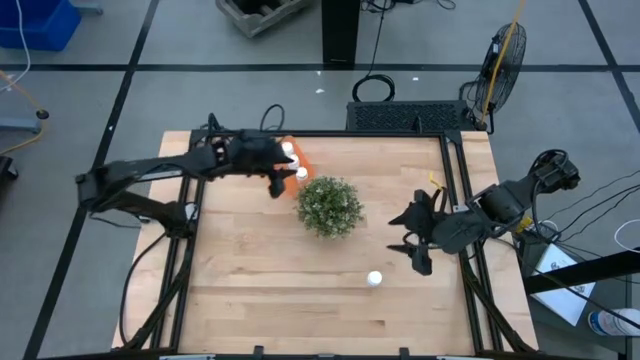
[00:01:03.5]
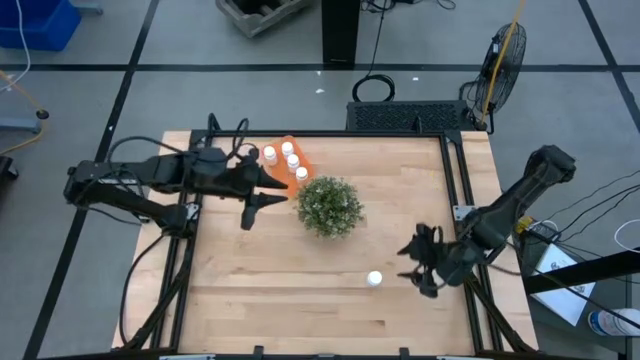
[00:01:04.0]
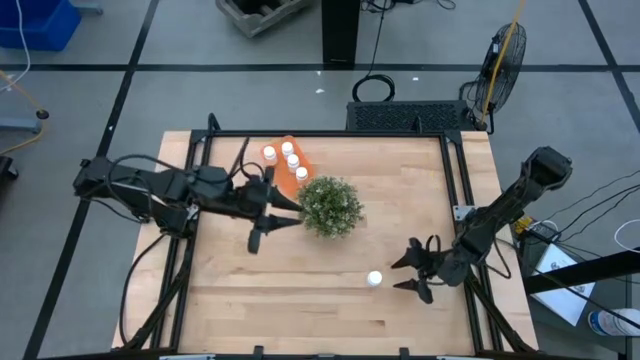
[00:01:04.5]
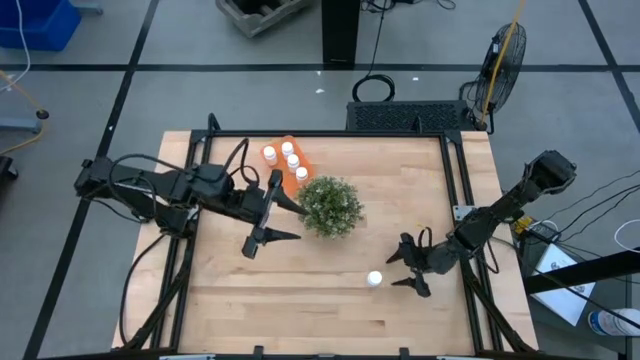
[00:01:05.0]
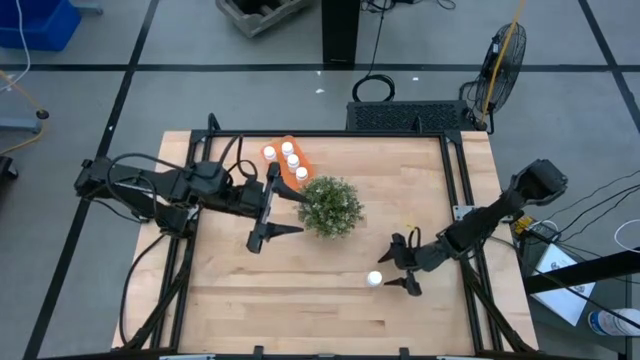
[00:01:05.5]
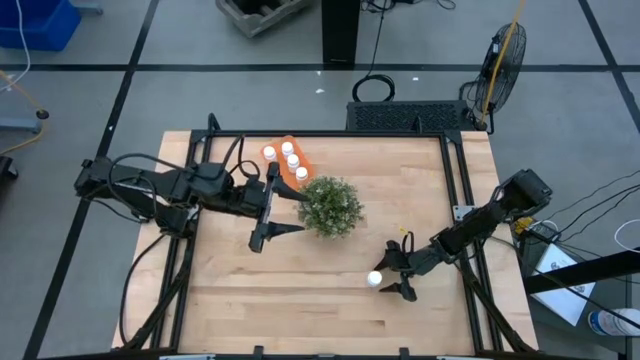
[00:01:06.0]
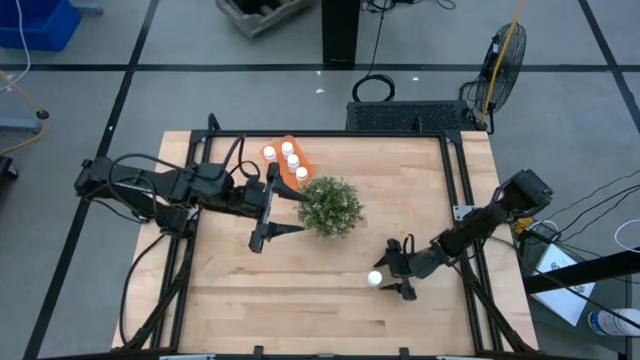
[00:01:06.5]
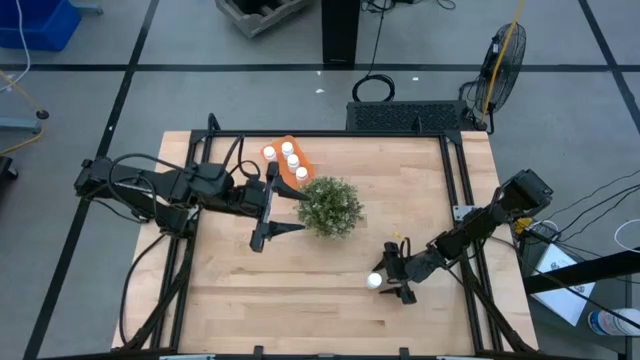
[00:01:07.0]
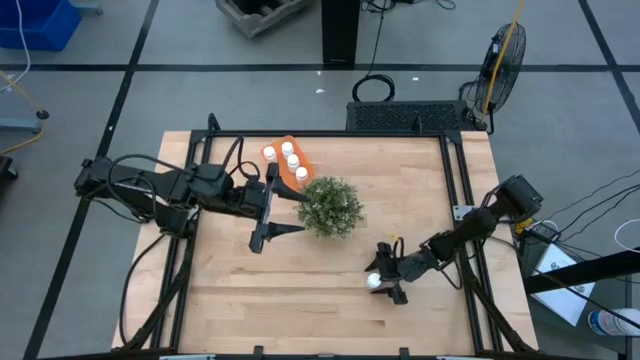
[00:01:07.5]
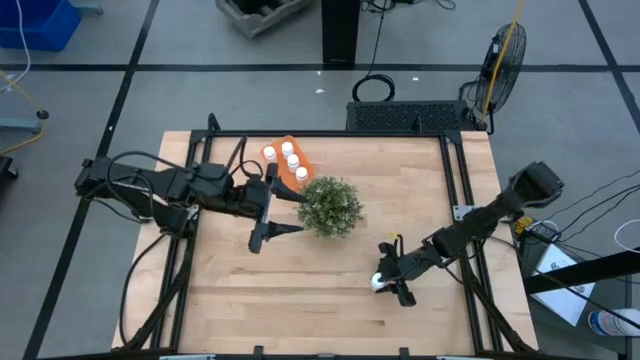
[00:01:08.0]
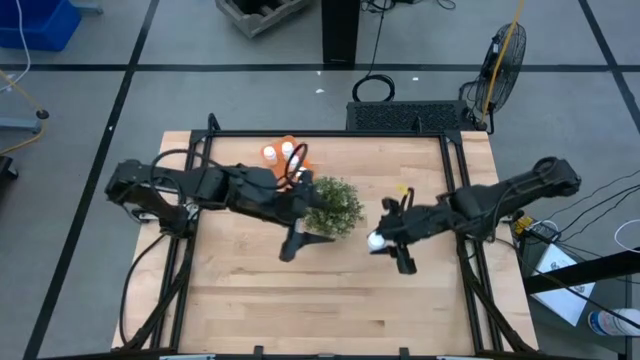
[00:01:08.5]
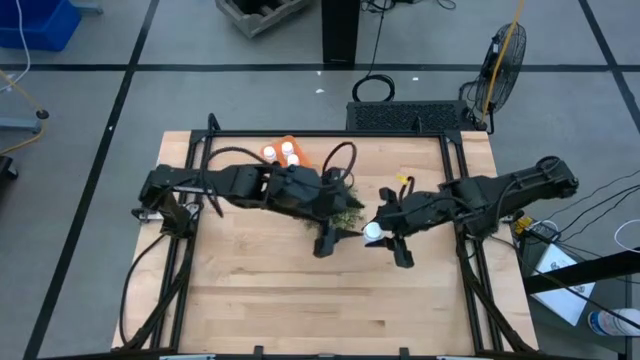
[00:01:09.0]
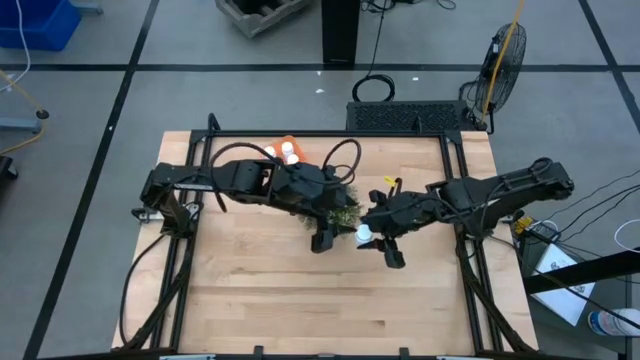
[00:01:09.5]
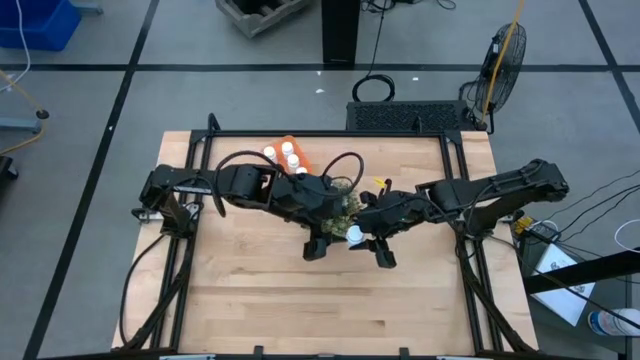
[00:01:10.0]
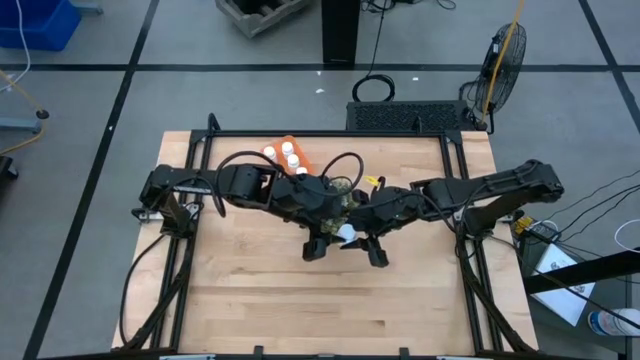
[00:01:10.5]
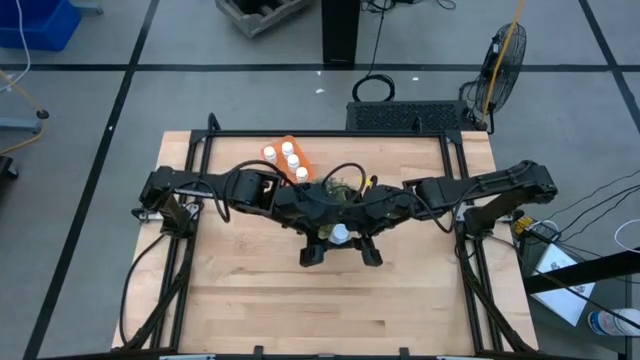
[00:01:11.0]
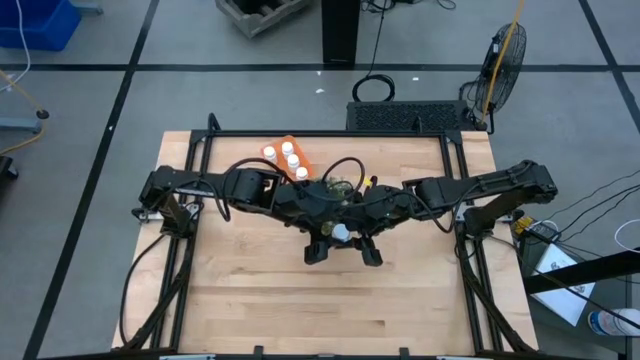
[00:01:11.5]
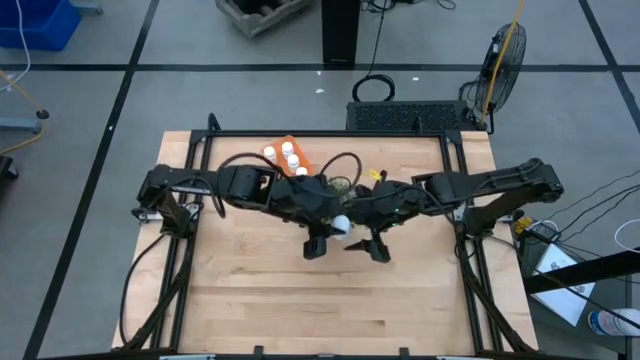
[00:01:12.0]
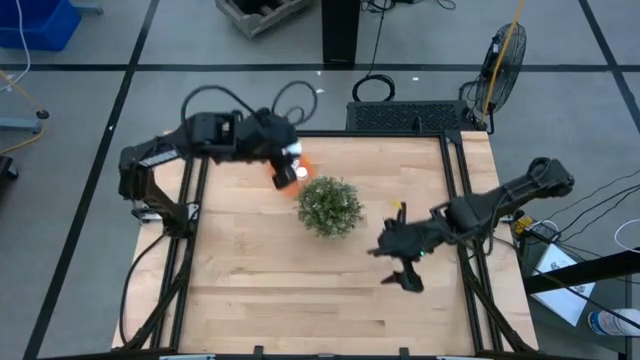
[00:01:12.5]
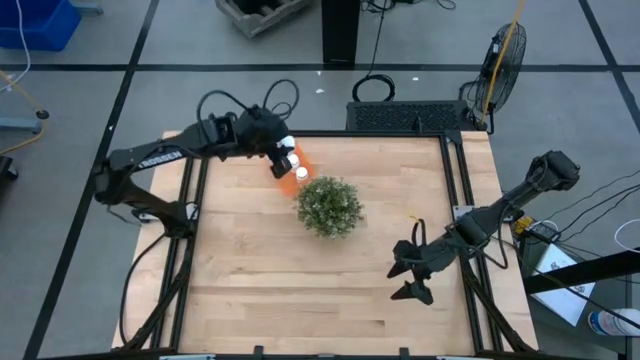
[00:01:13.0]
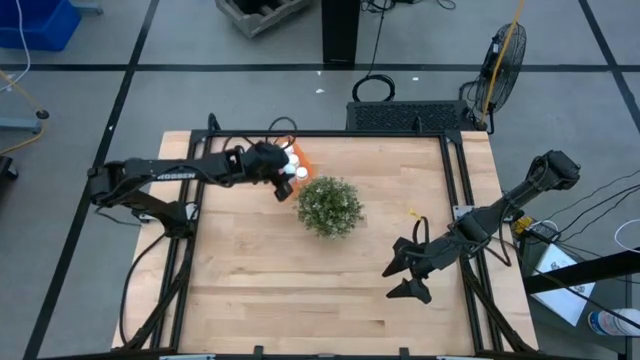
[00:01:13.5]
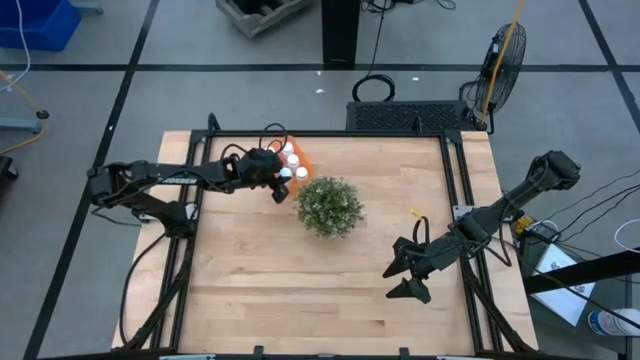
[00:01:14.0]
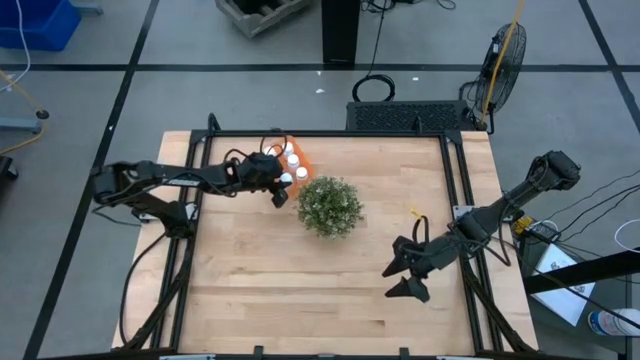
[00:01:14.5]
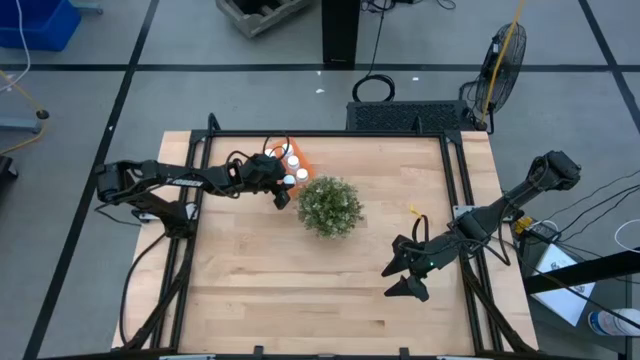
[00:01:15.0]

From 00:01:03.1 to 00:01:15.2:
Task: Pick and place pill bottles into a basket
Put the white medicine bottle into the orange bin

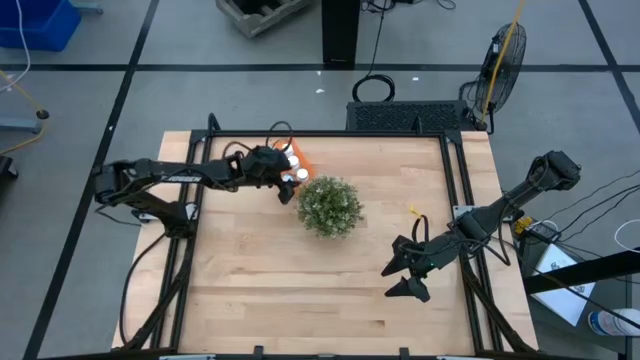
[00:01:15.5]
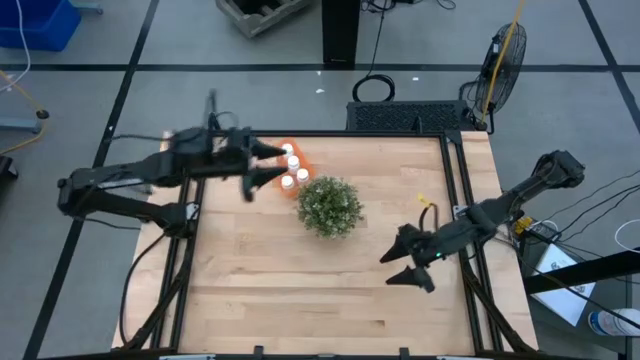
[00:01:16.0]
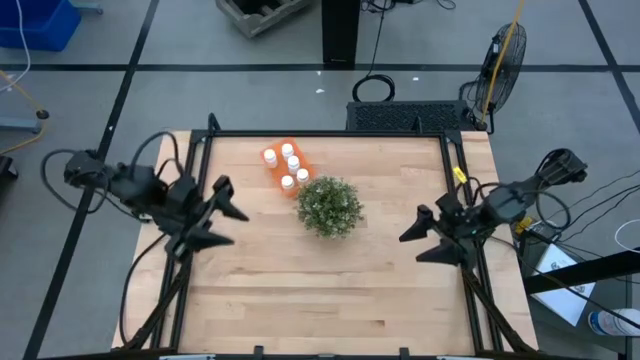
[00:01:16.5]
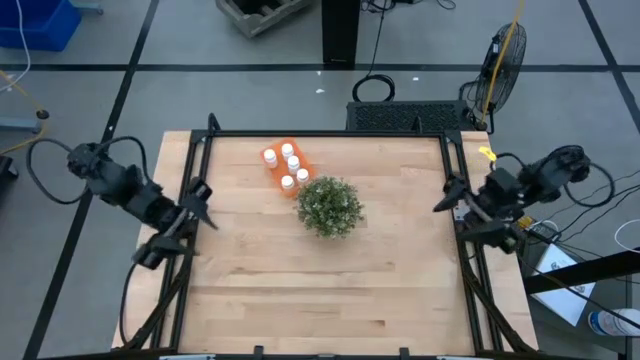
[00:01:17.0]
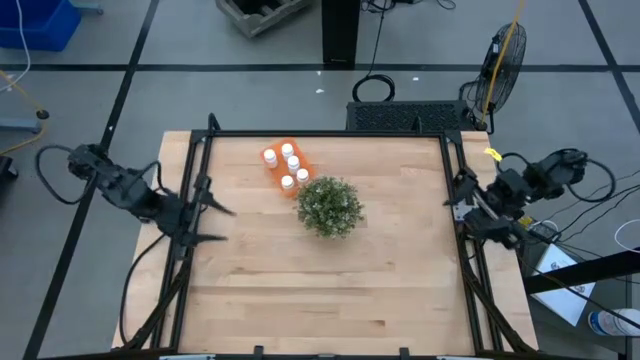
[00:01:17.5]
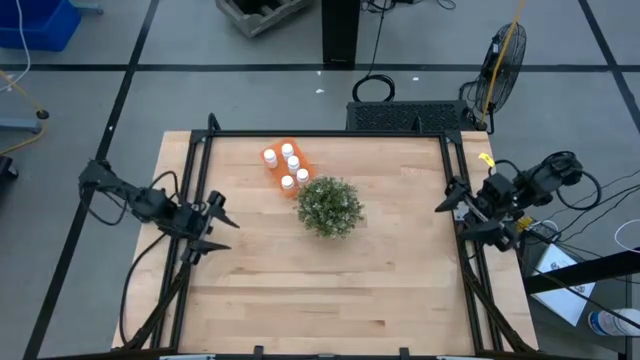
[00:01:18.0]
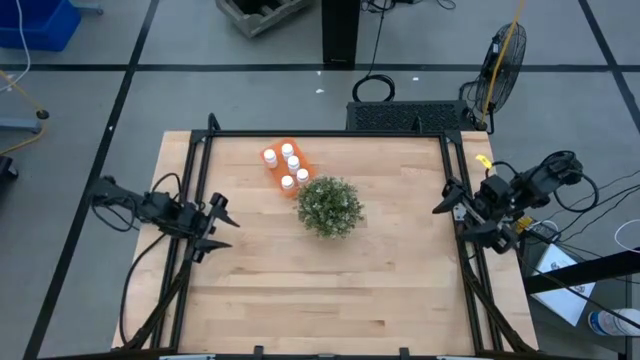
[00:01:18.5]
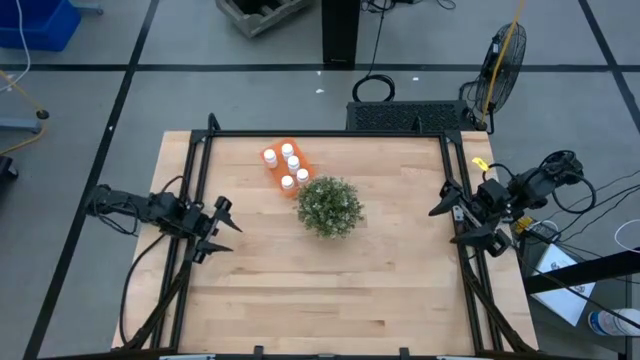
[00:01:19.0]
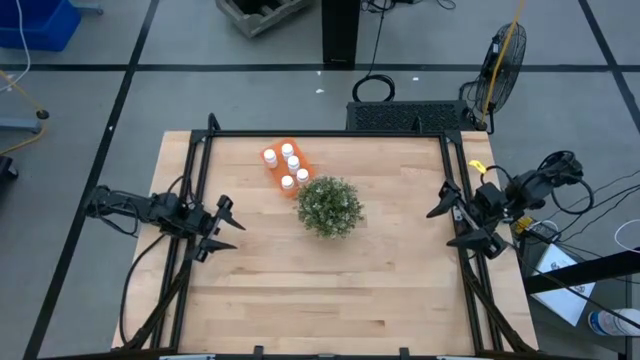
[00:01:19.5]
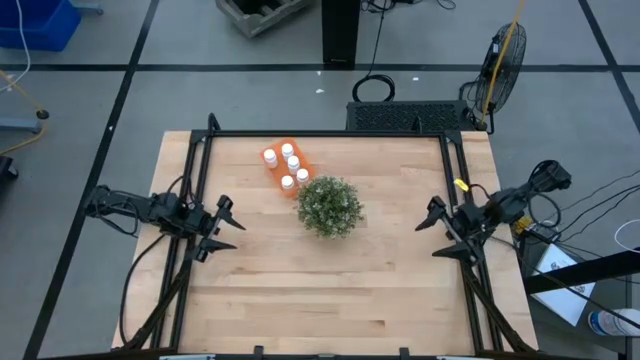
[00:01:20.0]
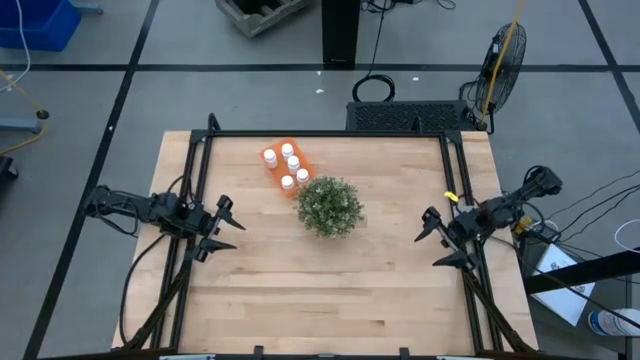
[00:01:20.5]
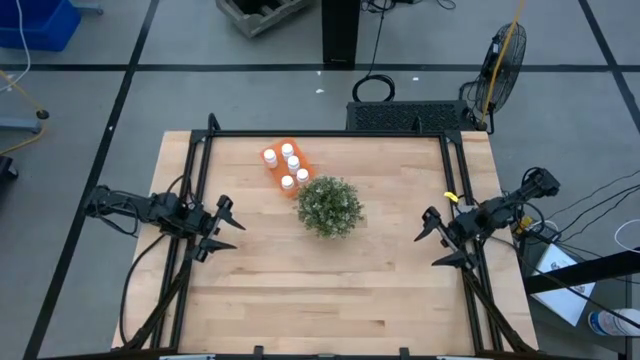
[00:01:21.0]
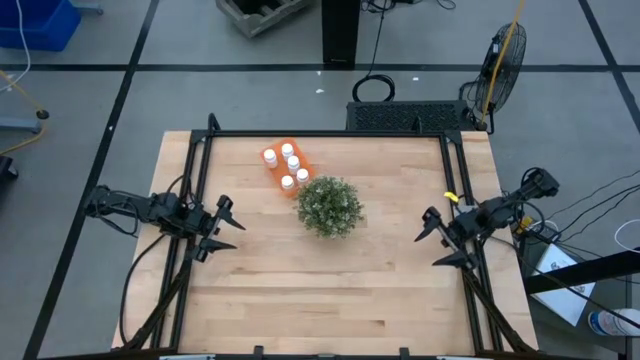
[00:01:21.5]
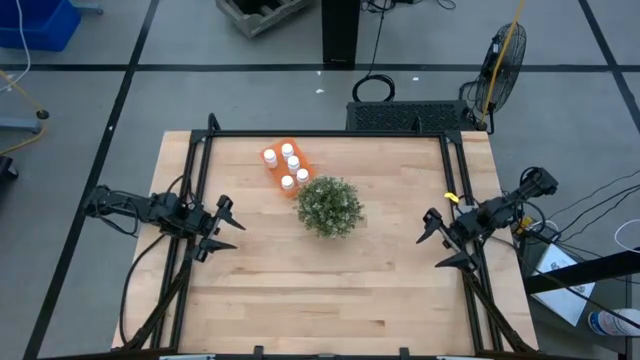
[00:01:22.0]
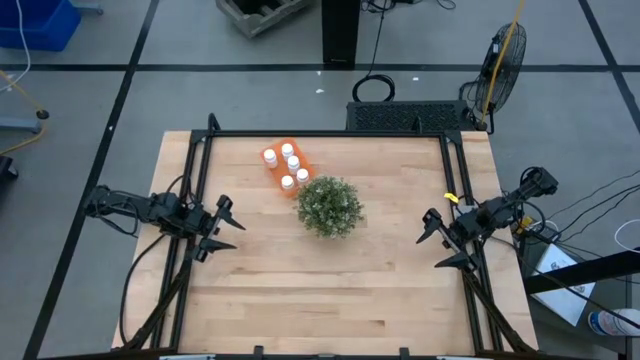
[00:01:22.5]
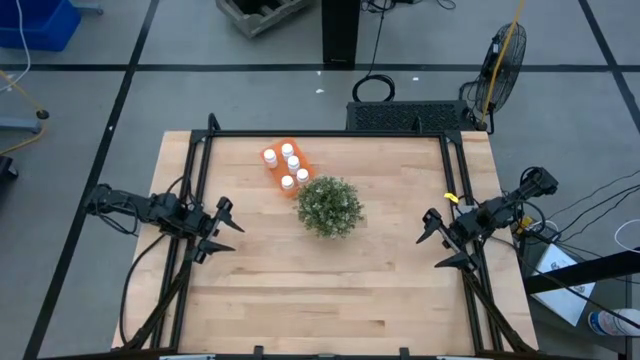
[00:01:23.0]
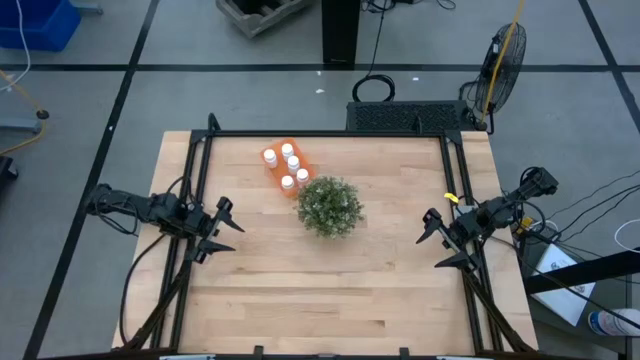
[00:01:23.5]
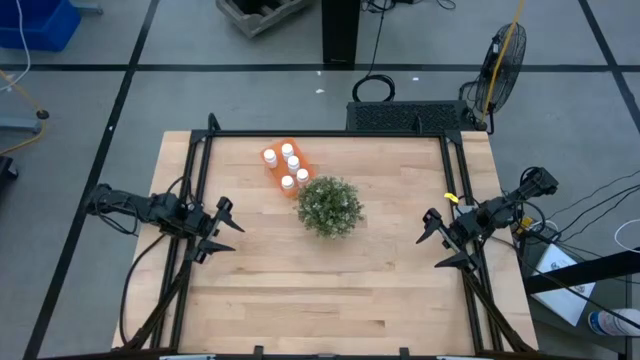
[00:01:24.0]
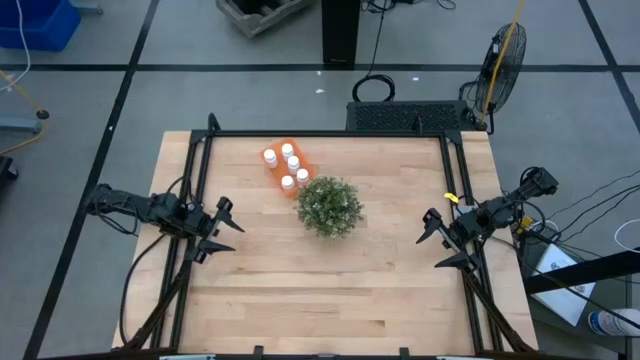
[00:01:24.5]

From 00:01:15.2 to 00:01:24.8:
Return to Home Position
